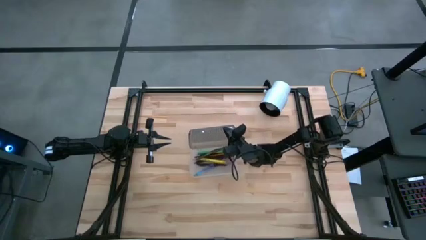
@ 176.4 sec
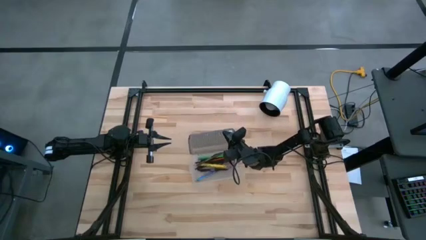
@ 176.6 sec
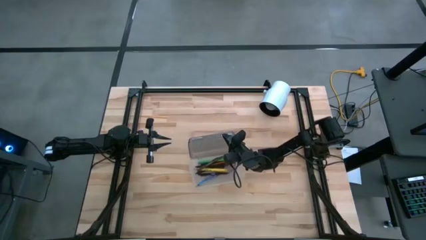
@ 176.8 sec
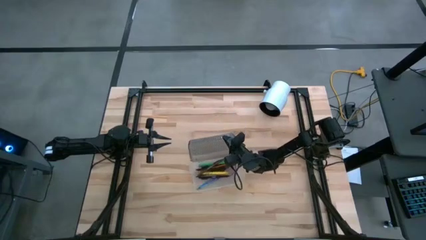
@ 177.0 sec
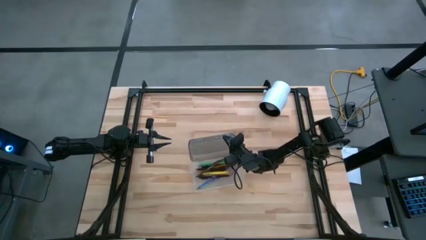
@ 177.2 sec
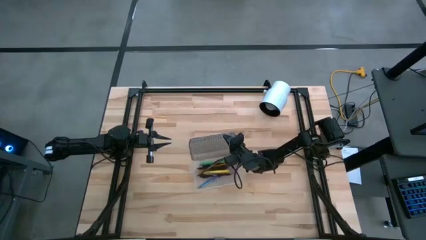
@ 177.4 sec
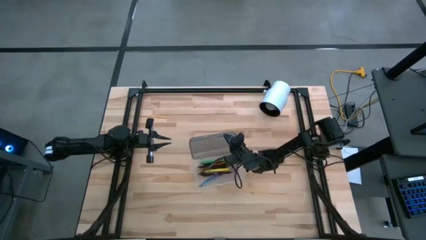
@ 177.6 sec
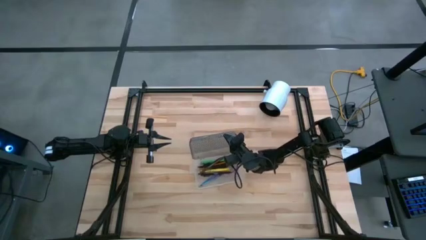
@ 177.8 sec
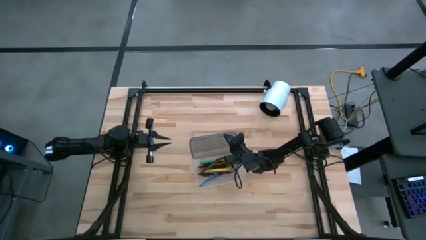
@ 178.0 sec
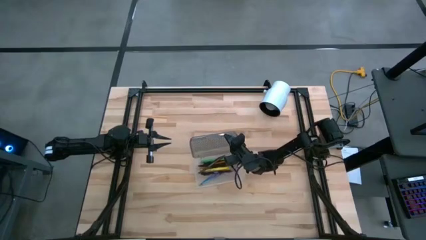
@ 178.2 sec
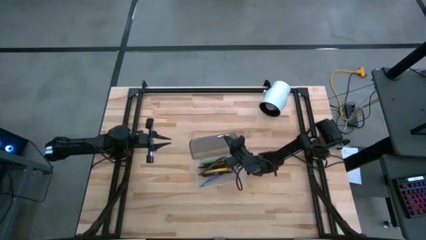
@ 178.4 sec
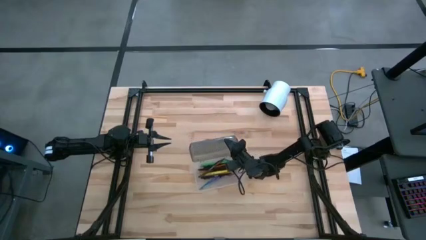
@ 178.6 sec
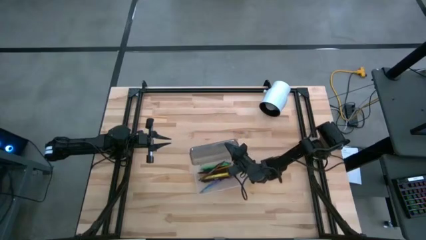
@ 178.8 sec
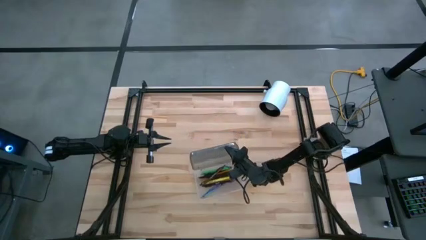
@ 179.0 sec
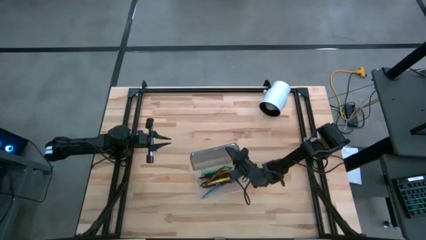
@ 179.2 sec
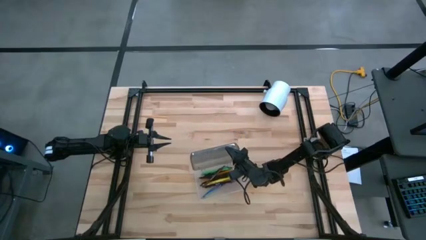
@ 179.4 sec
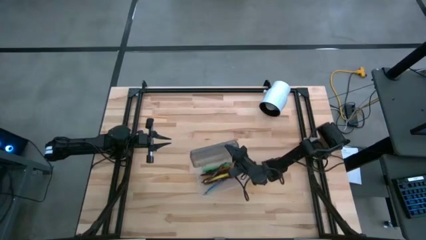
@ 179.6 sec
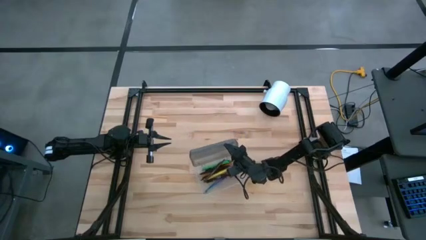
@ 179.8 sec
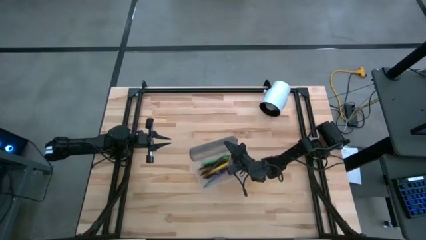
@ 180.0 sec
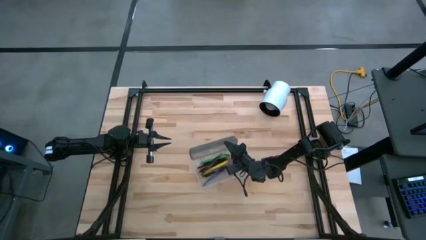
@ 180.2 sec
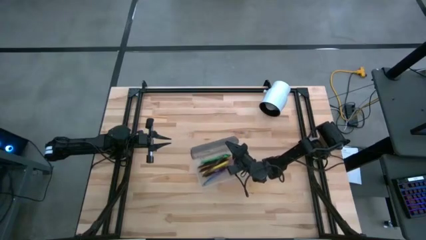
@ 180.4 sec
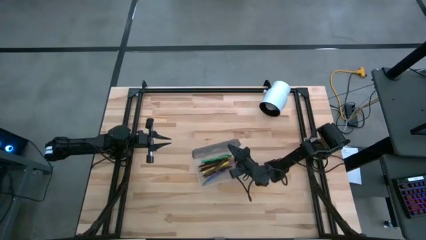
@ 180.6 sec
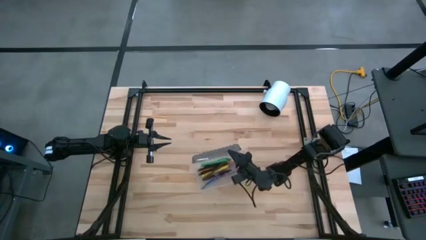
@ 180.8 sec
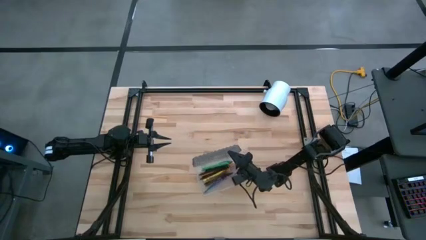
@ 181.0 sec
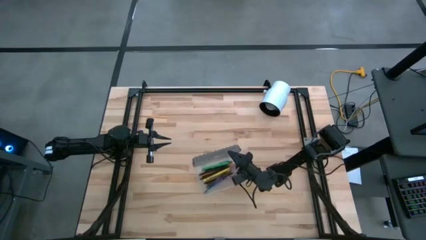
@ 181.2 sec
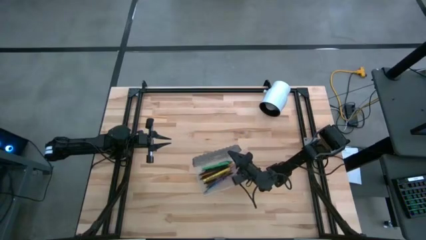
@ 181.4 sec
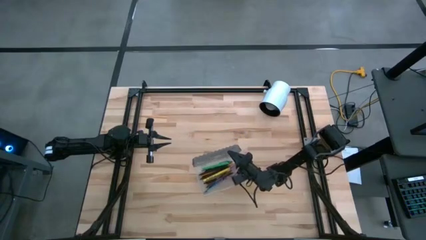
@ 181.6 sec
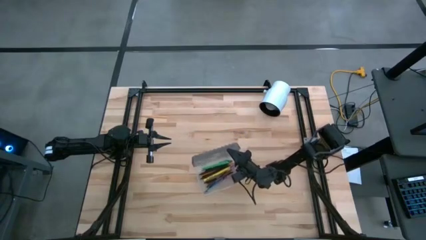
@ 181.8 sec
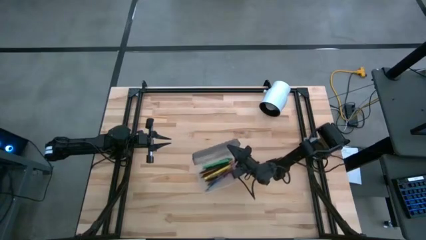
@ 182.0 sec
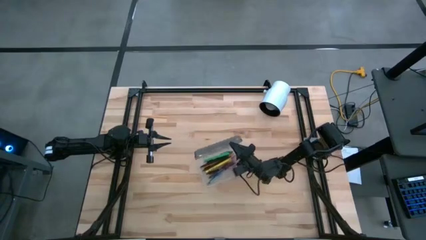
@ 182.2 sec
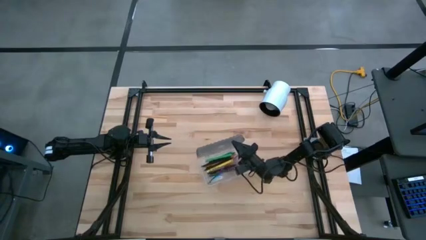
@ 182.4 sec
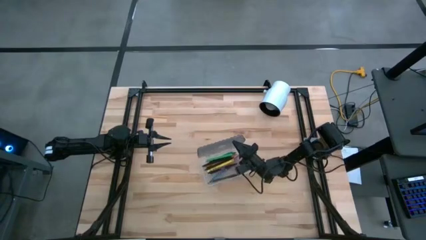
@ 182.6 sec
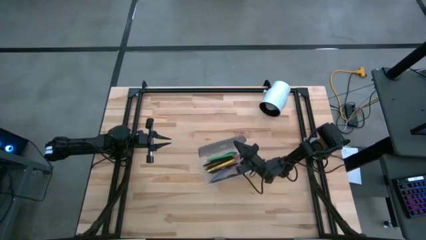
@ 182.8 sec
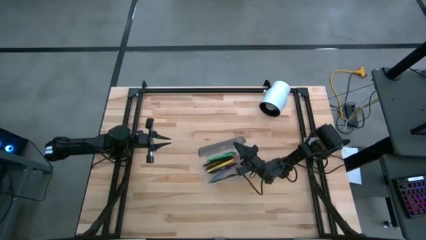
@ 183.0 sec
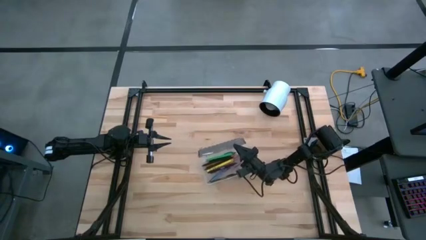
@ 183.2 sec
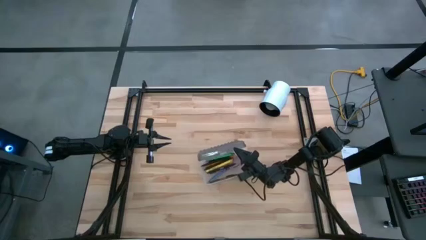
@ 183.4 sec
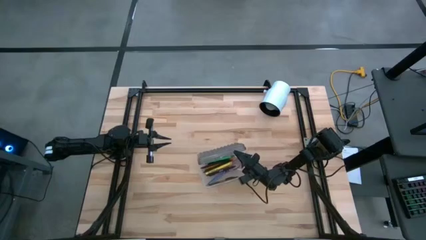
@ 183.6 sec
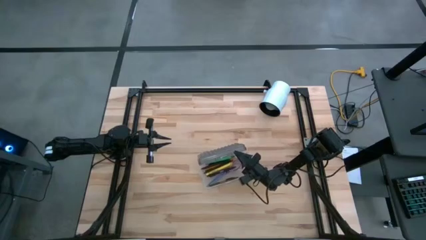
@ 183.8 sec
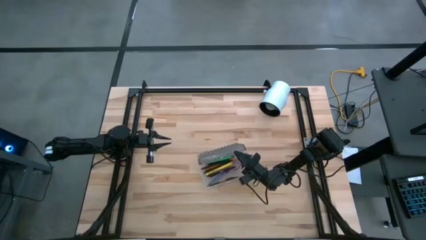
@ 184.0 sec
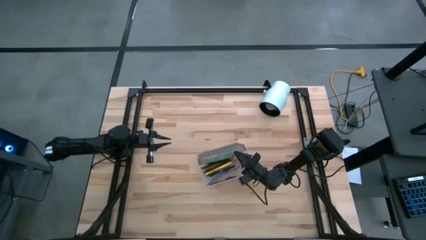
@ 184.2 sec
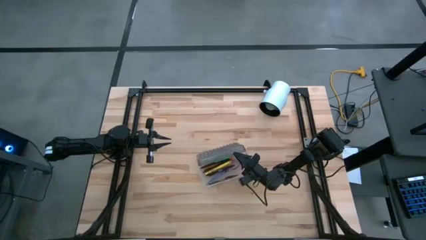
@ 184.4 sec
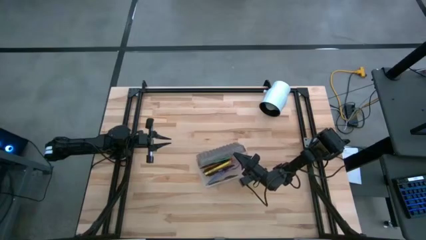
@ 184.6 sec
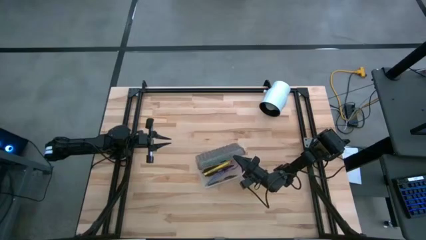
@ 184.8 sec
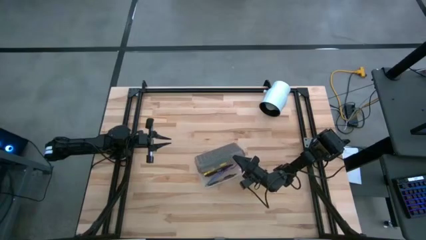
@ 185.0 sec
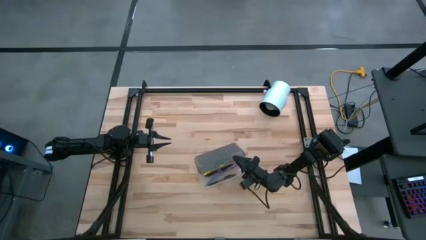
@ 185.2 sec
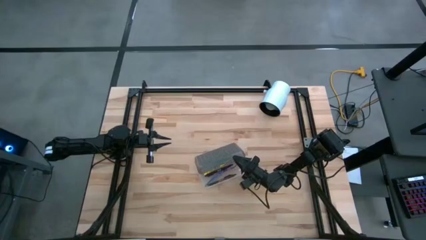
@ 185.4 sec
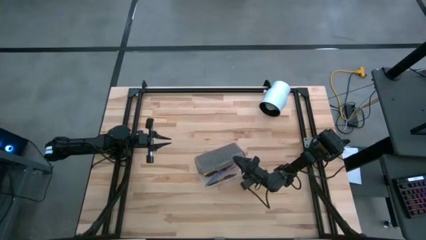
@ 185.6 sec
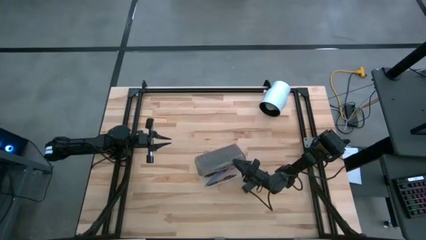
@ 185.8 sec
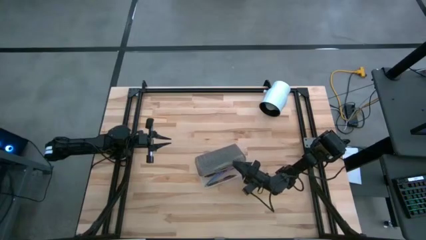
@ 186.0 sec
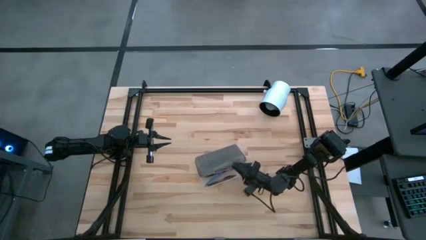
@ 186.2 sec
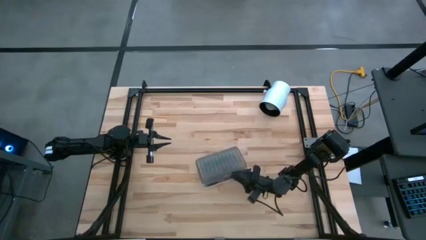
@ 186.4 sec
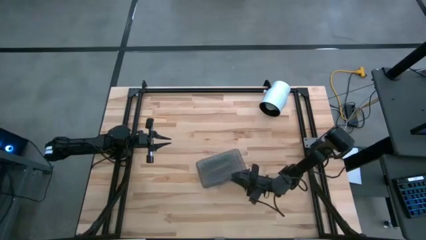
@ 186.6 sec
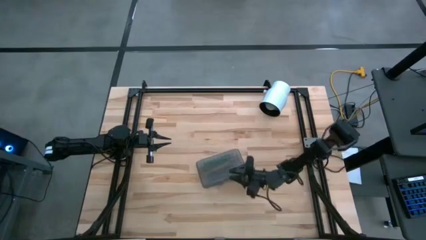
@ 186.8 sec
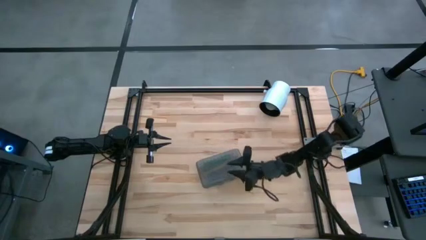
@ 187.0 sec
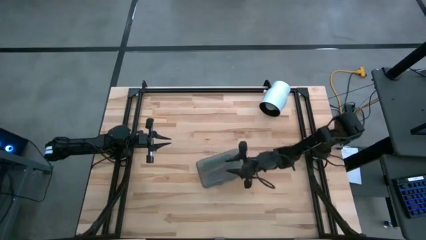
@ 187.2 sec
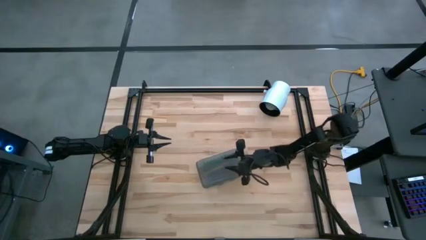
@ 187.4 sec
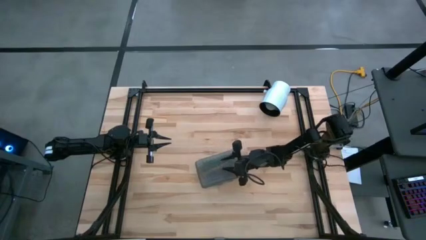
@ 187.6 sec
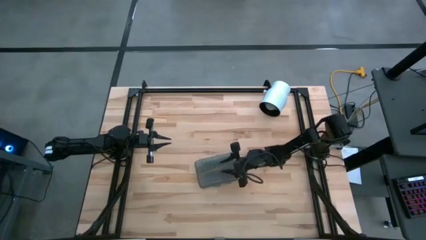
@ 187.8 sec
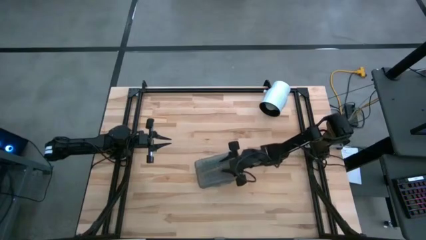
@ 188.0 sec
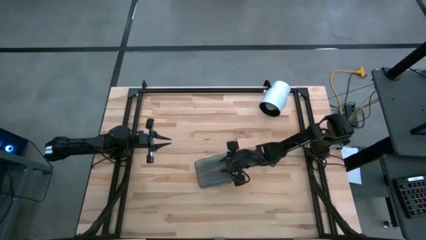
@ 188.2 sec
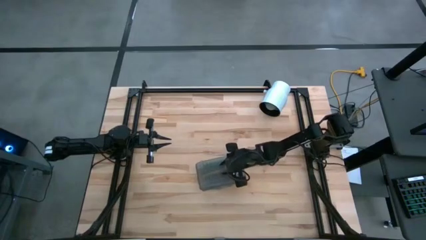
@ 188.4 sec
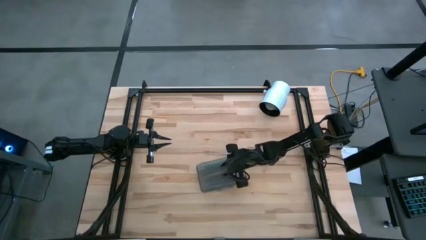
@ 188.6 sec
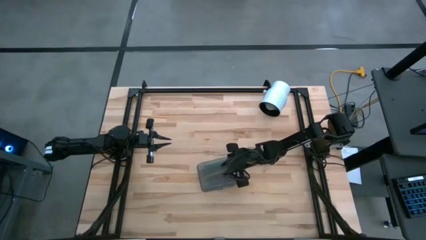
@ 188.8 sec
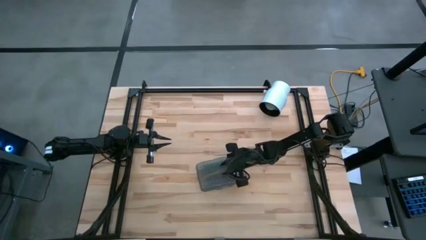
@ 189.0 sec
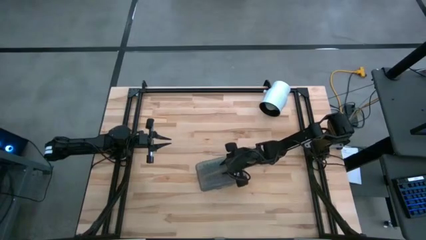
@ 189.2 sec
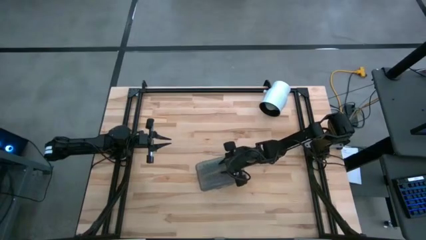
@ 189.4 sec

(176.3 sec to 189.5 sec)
Task: Pick & place school supplies into a supply box
Close the supply box
